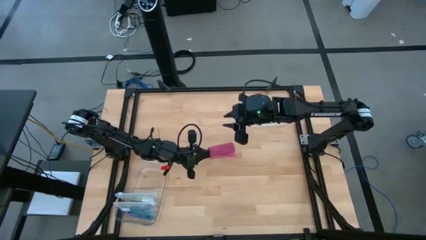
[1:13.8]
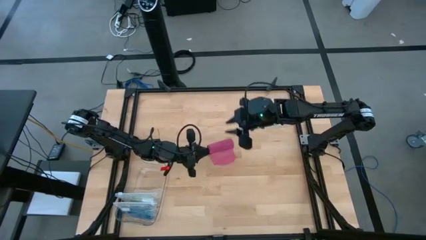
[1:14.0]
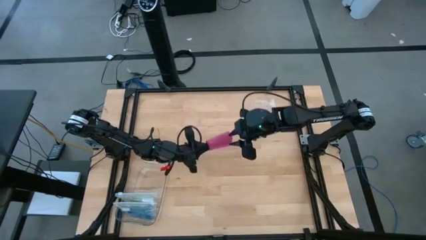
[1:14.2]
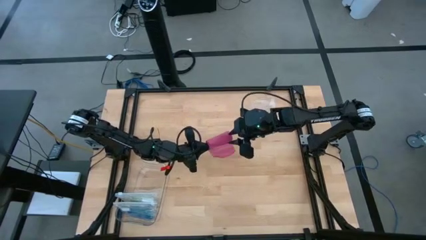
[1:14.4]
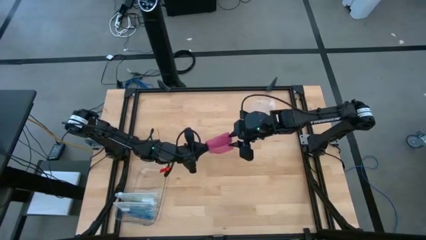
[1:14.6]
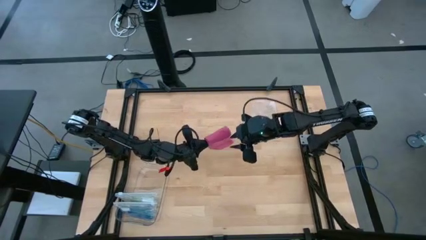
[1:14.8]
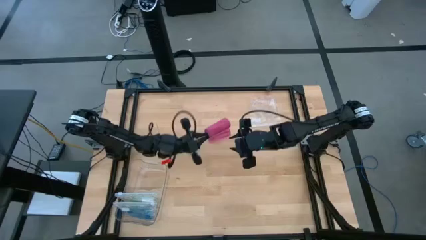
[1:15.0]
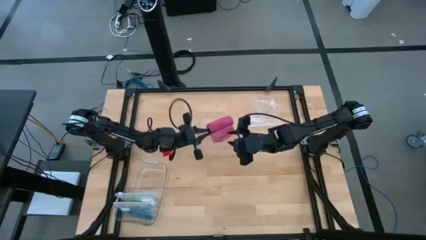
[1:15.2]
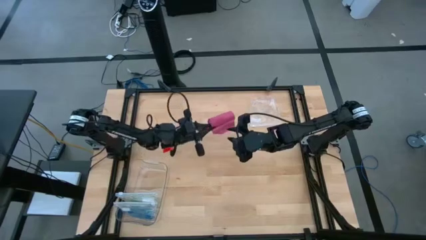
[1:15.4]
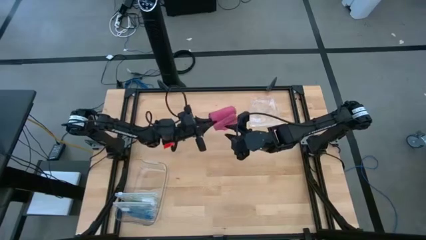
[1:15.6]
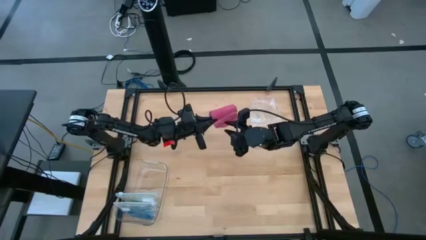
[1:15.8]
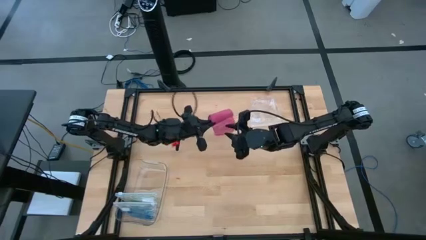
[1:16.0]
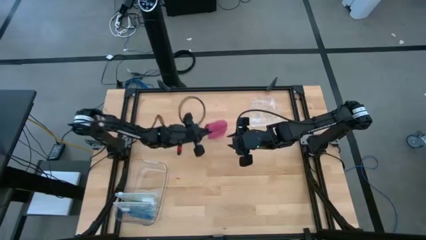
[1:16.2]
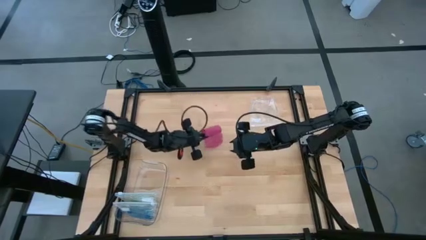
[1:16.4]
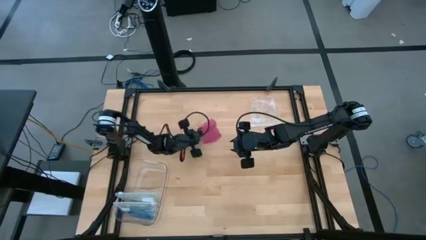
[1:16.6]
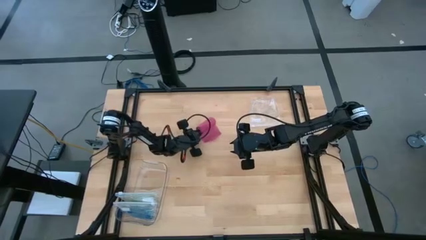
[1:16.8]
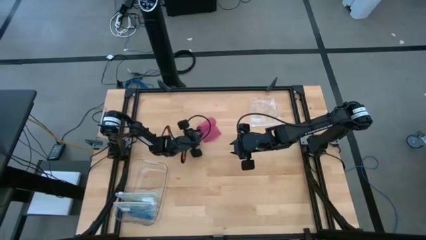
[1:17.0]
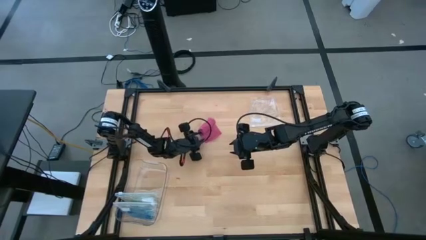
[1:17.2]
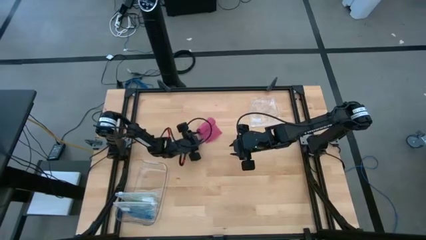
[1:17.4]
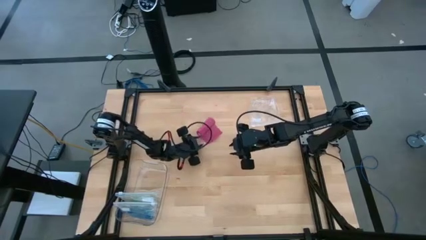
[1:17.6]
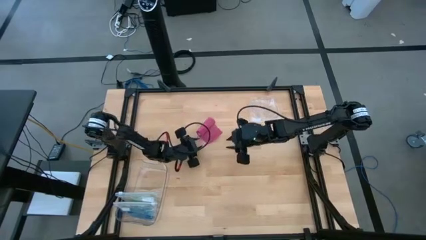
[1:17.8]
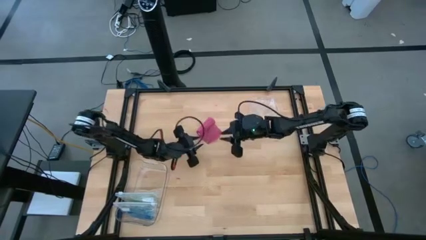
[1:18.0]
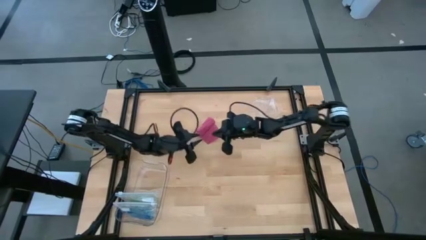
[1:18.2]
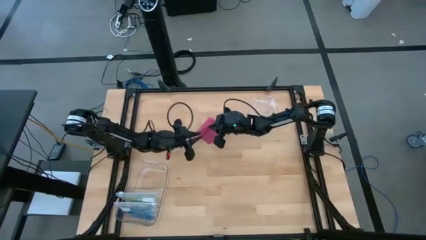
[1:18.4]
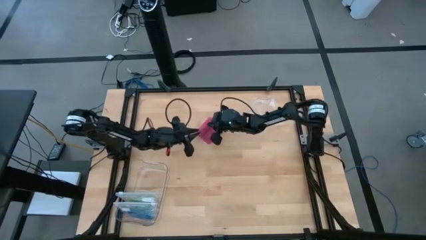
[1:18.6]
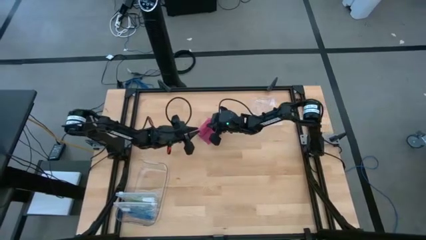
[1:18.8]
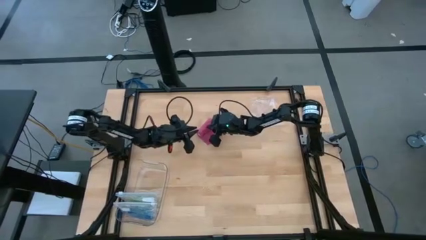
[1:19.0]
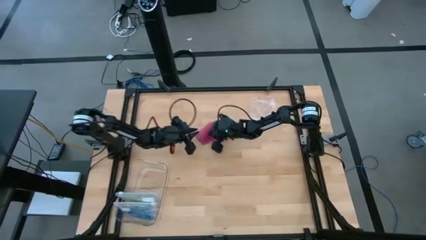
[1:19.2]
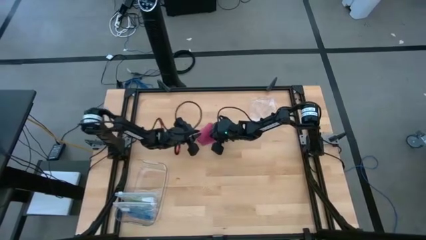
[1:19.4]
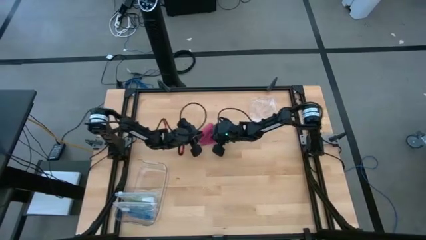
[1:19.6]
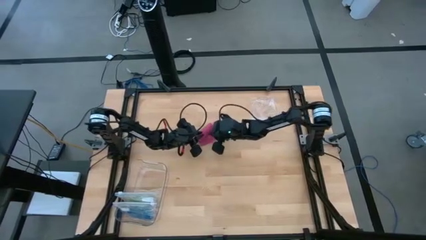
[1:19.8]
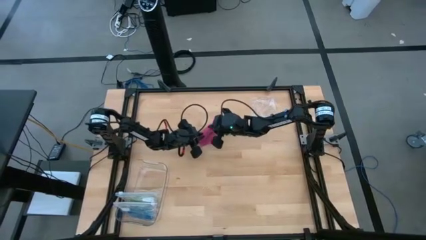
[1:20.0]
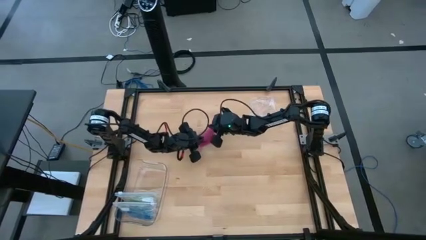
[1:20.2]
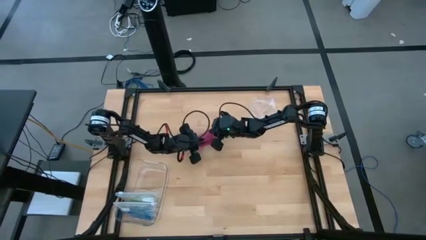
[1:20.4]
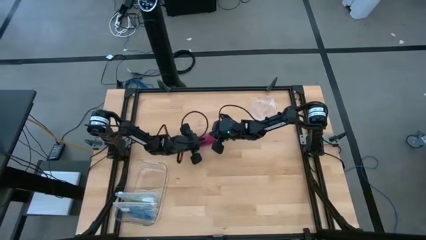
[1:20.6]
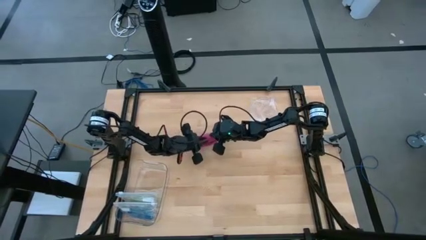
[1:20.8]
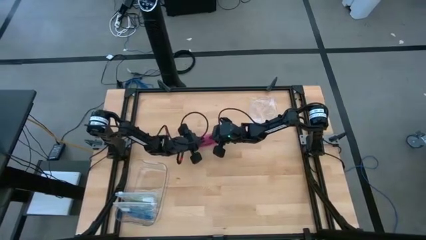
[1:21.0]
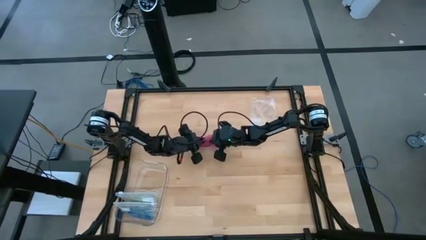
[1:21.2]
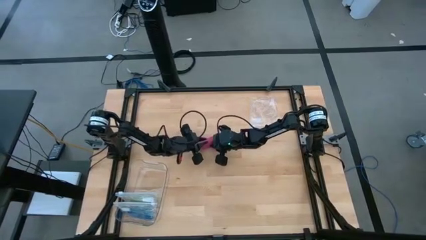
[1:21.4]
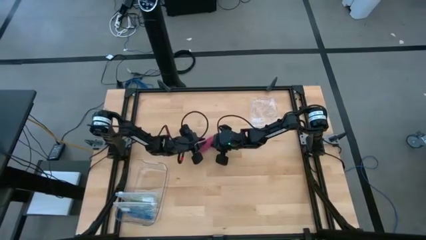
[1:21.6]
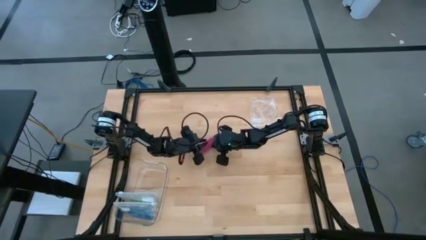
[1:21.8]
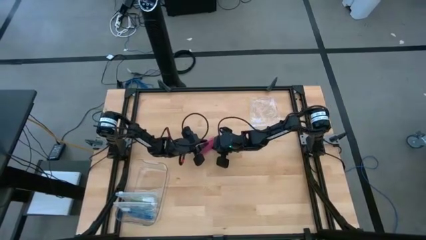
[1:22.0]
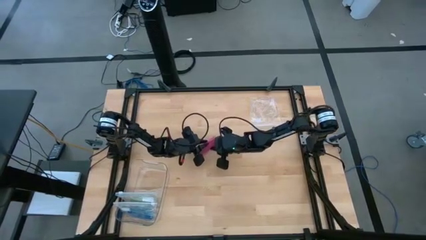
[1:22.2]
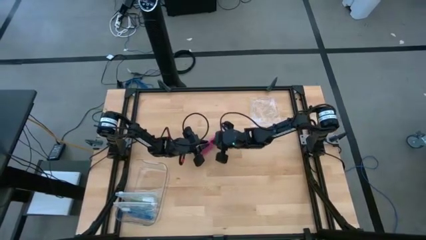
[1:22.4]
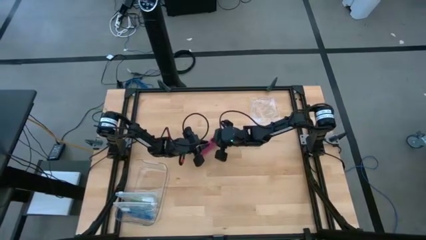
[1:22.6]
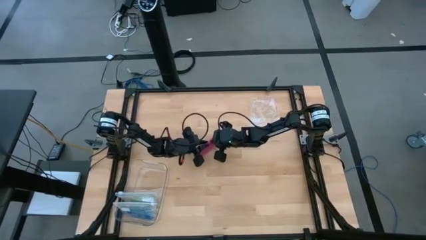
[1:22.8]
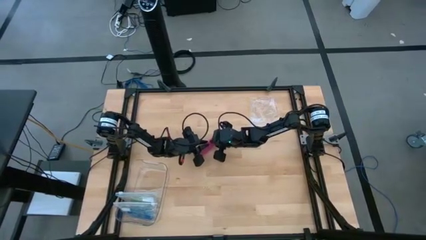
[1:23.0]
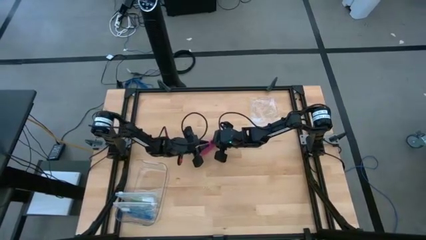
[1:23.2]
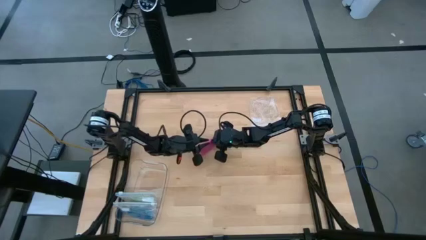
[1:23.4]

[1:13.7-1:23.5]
Task: Roll bandage
Roll the pink bandage

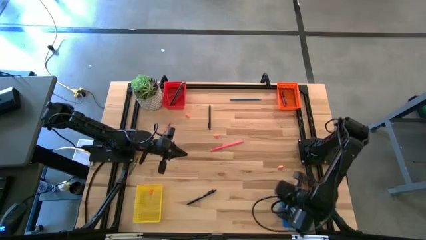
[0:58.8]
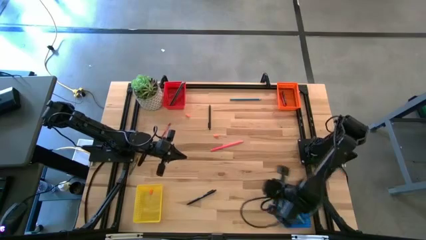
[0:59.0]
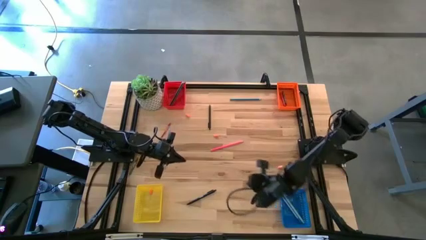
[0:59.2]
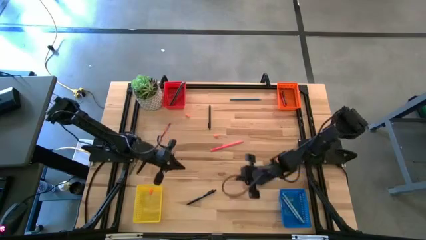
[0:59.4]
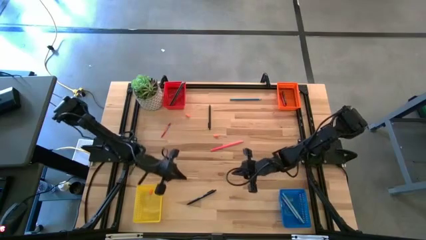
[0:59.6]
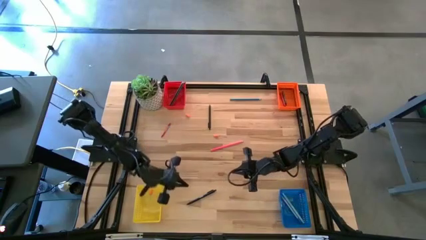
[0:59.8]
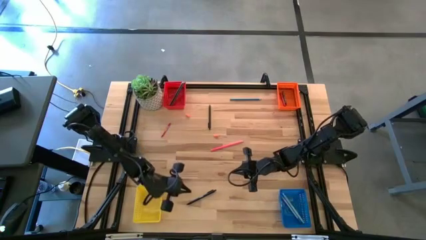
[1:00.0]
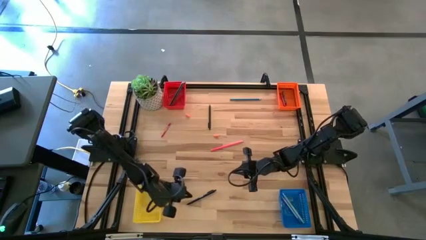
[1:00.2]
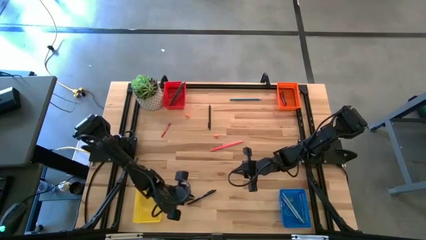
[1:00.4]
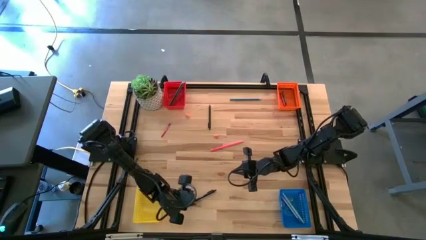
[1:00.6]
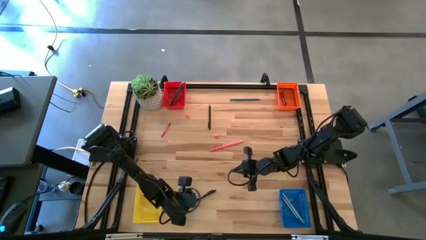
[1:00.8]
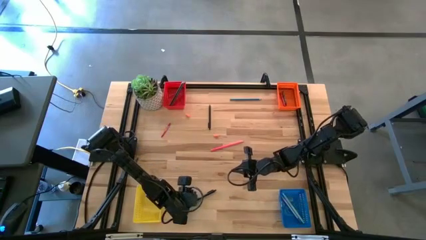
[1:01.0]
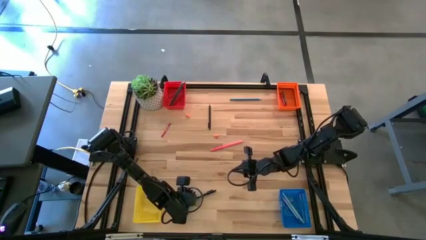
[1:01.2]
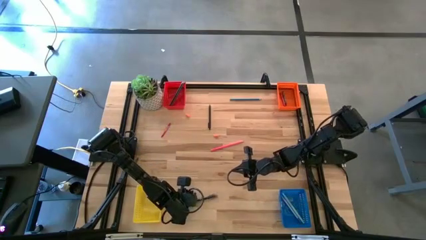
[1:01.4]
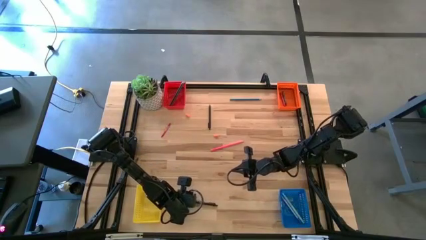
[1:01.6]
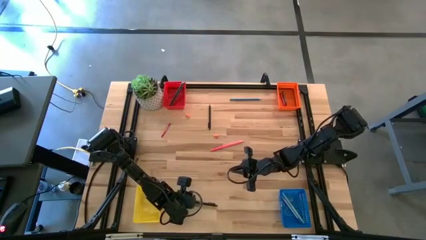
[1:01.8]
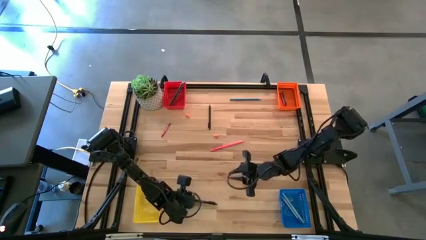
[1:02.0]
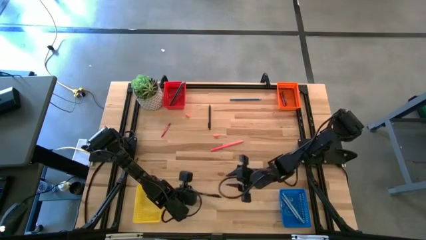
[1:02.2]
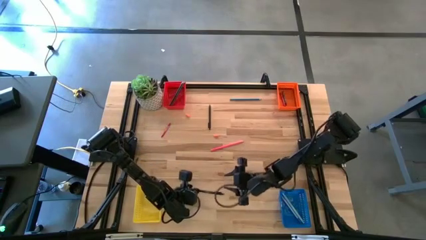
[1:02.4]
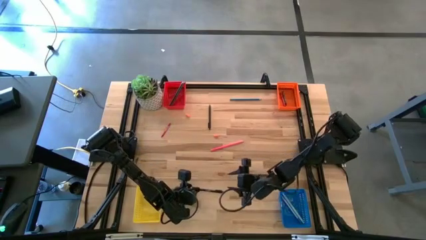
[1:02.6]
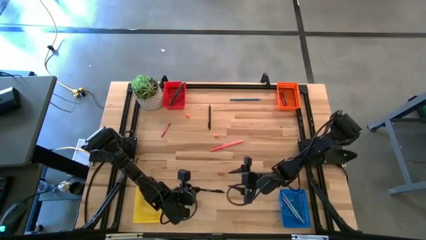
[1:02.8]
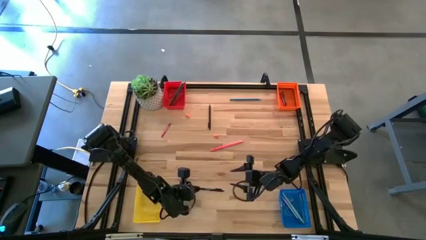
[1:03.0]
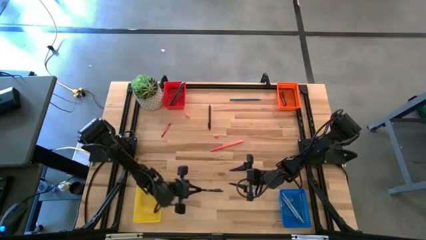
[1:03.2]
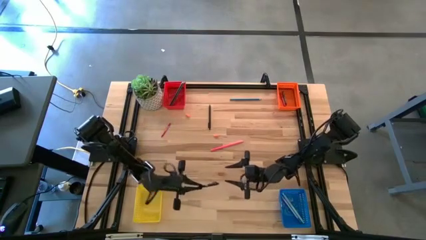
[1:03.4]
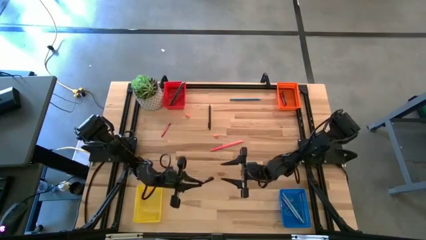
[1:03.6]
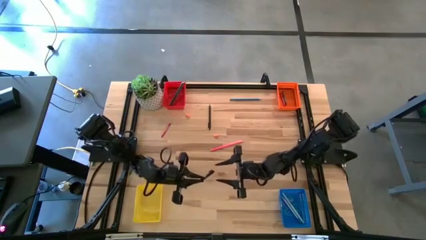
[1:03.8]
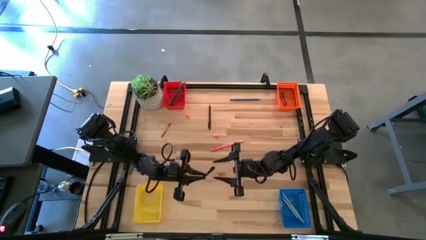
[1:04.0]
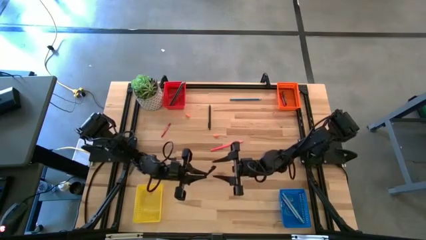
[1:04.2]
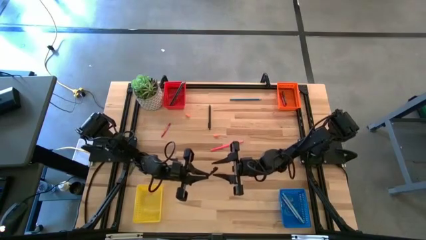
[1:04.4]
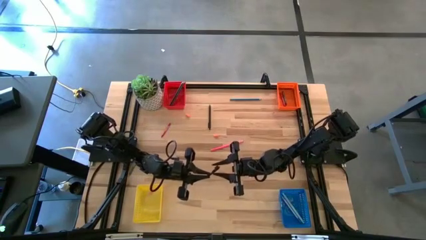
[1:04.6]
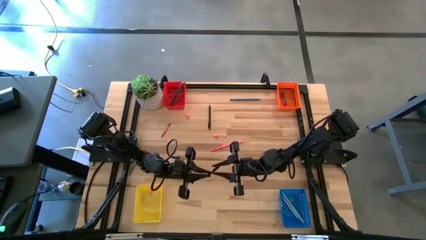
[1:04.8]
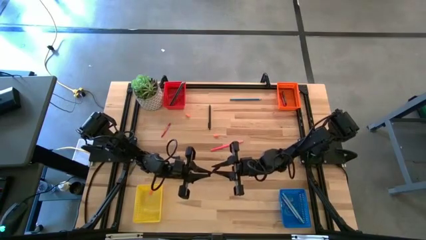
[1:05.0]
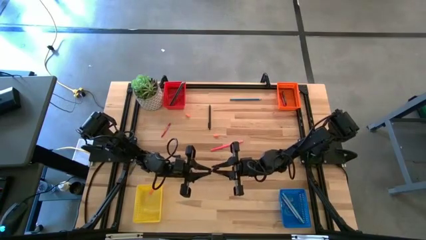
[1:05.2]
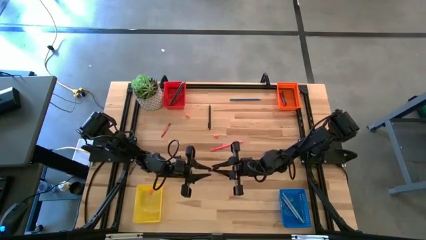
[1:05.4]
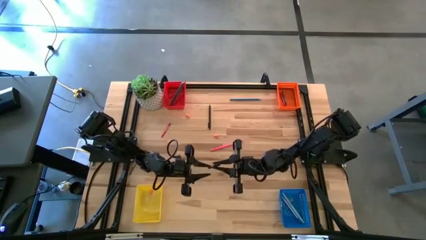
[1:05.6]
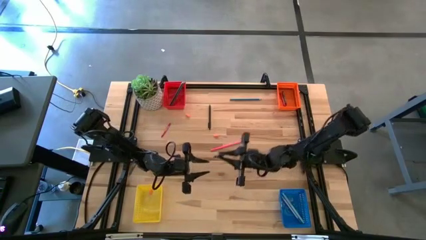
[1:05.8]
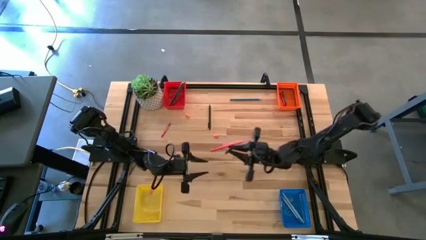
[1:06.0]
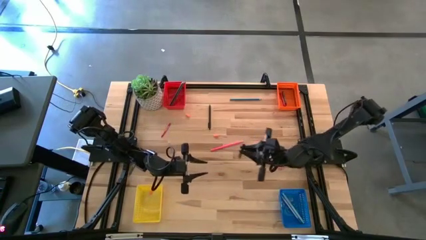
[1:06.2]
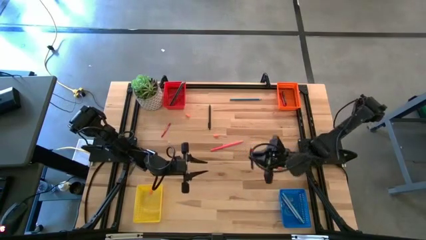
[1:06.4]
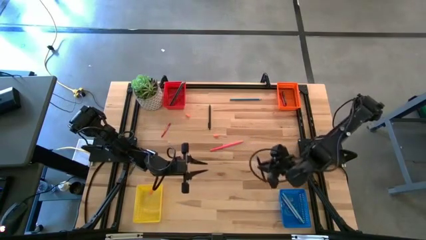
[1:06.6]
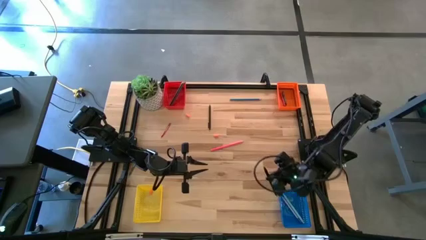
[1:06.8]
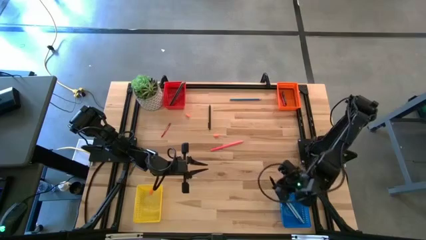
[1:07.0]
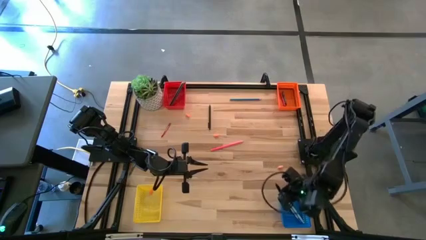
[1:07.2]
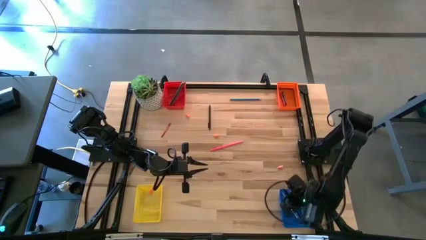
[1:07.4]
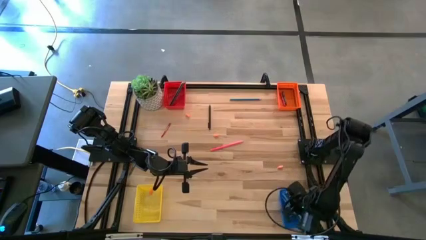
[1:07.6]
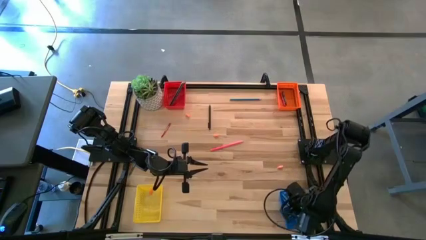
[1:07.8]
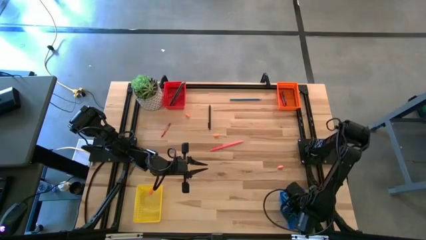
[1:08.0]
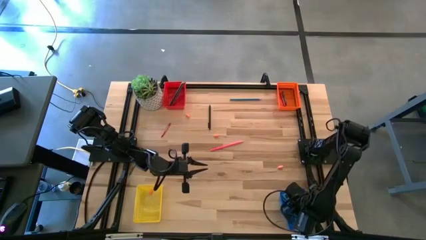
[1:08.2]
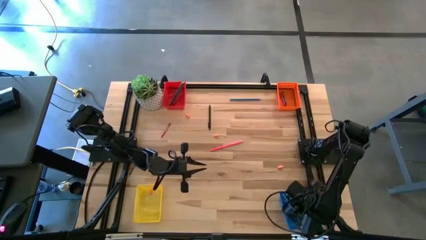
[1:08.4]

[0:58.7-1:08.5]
Task: Sort crayons/erasers/pens/pencils in bins
Put the black pen into the blue bin
